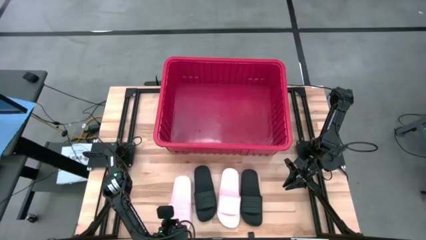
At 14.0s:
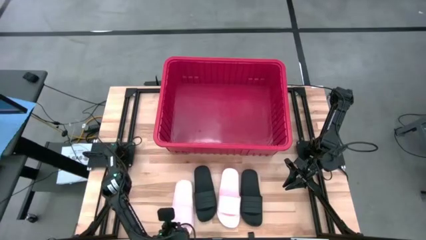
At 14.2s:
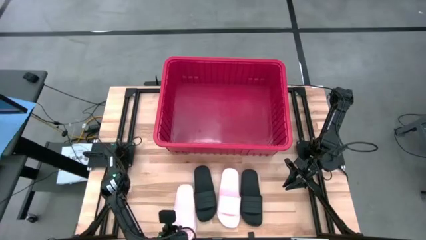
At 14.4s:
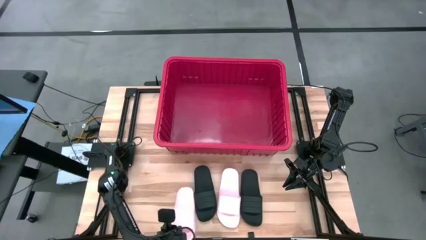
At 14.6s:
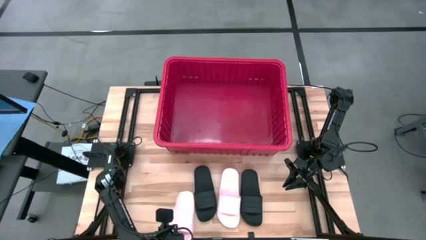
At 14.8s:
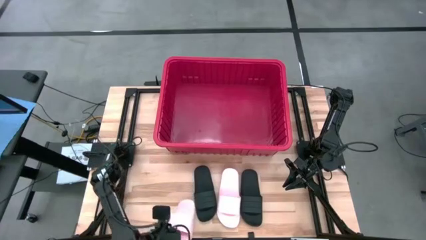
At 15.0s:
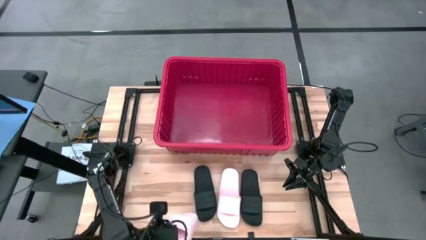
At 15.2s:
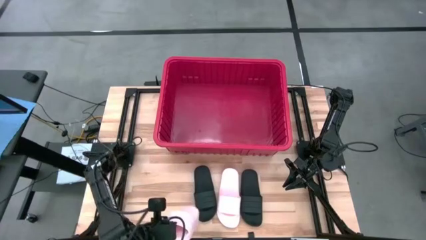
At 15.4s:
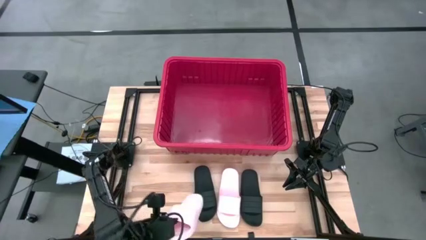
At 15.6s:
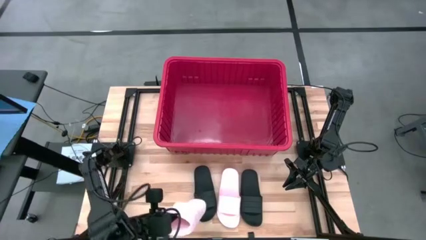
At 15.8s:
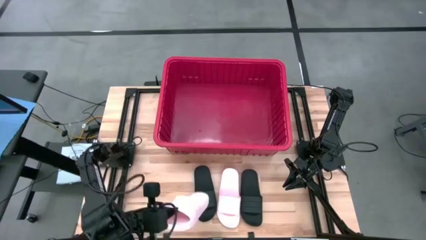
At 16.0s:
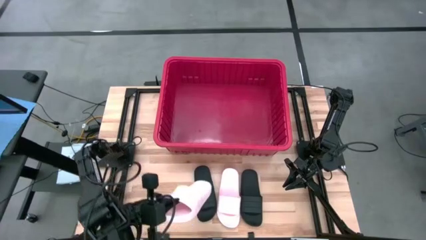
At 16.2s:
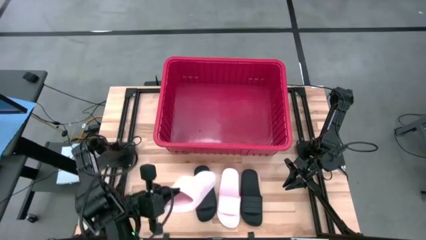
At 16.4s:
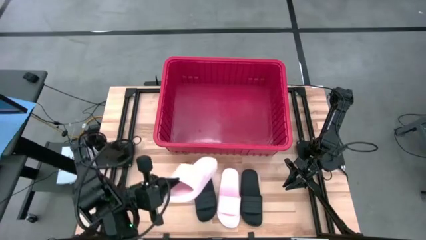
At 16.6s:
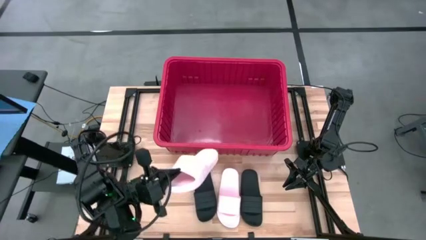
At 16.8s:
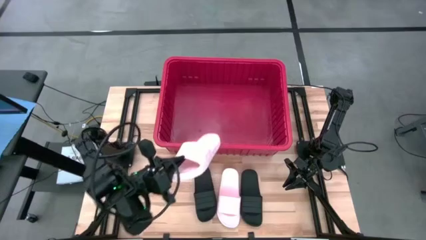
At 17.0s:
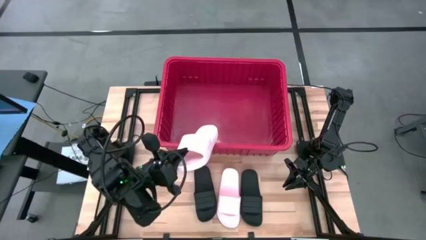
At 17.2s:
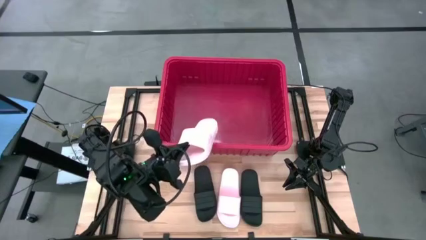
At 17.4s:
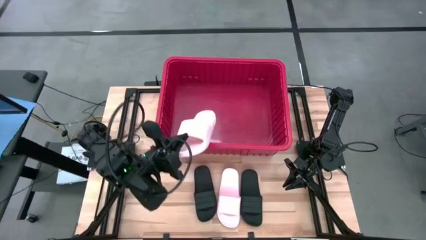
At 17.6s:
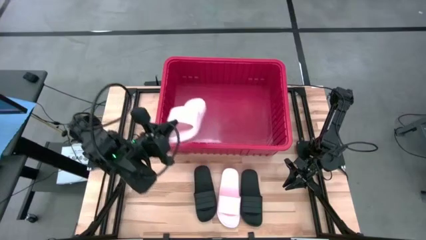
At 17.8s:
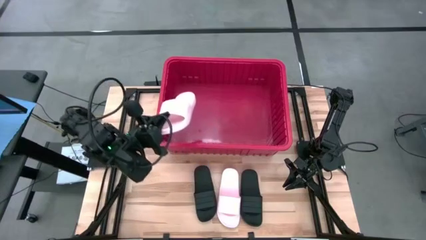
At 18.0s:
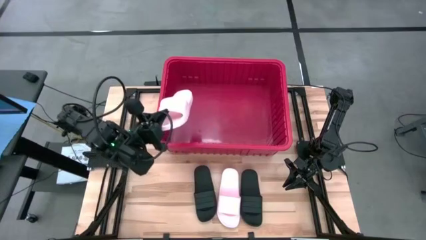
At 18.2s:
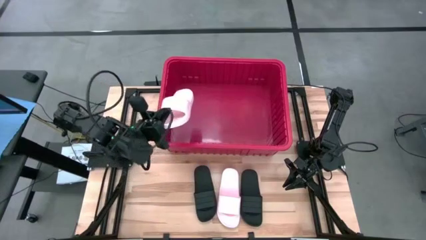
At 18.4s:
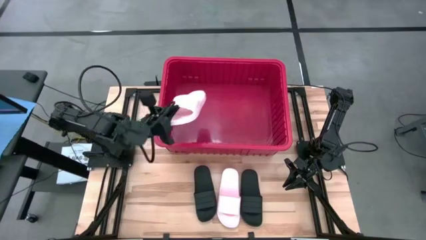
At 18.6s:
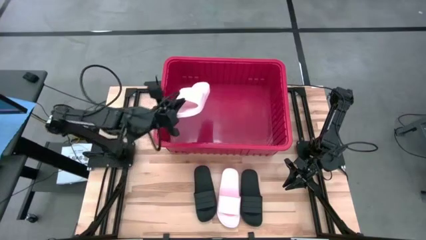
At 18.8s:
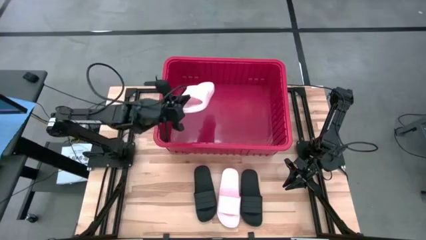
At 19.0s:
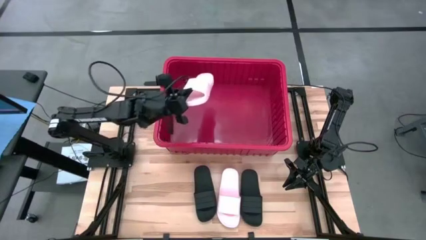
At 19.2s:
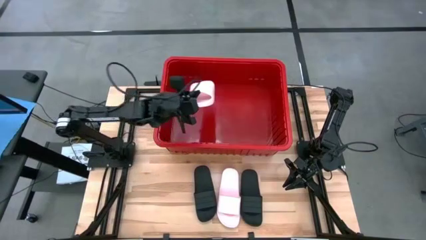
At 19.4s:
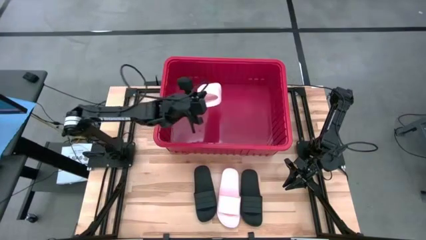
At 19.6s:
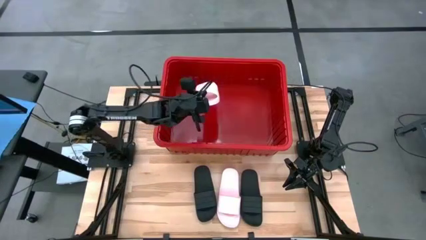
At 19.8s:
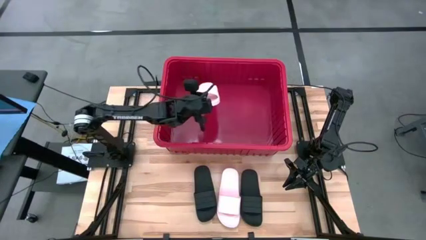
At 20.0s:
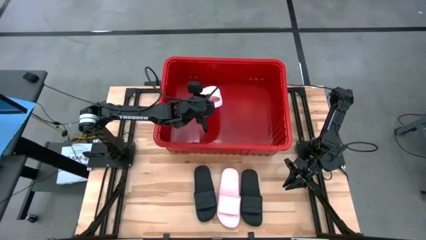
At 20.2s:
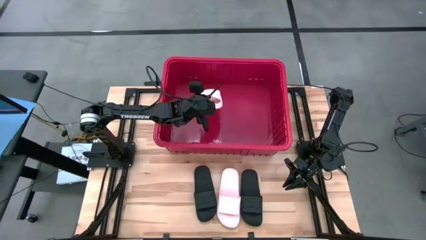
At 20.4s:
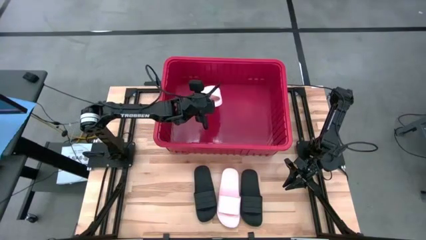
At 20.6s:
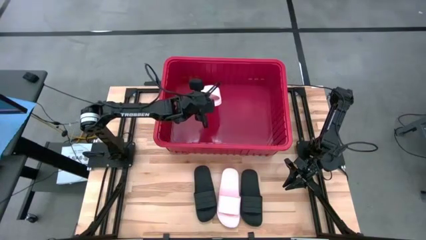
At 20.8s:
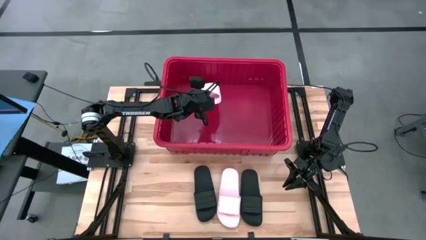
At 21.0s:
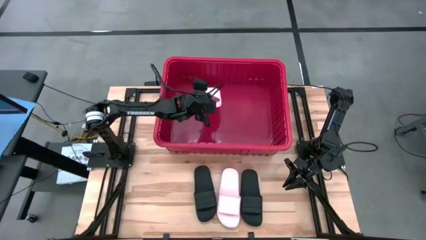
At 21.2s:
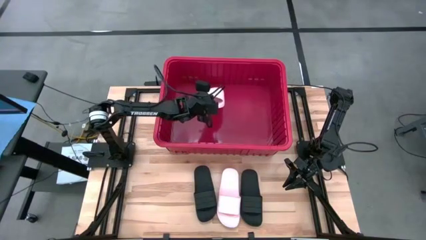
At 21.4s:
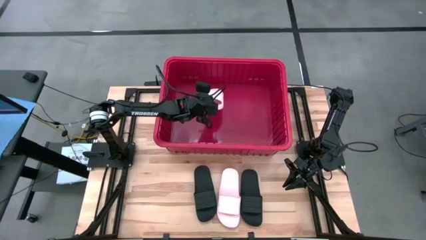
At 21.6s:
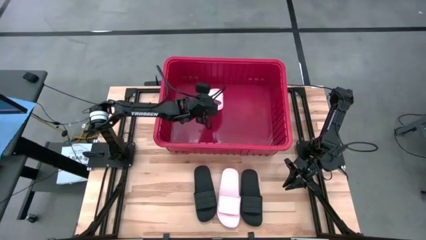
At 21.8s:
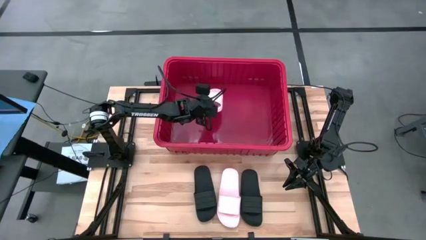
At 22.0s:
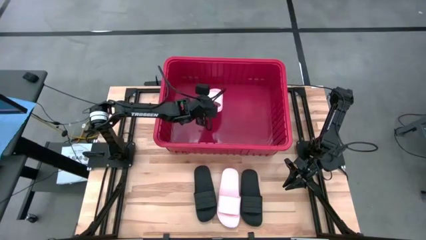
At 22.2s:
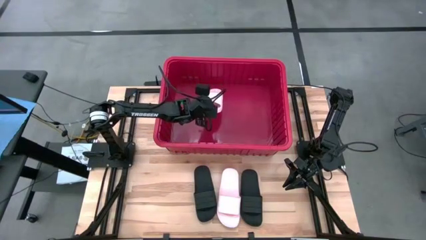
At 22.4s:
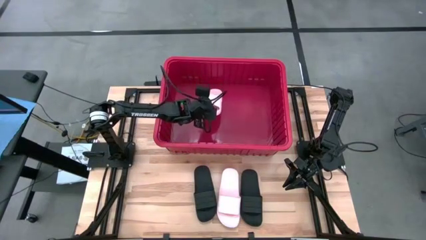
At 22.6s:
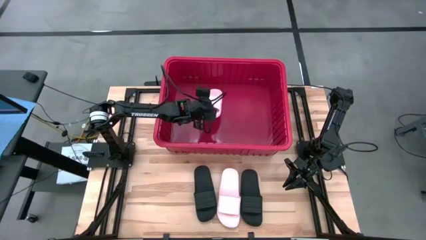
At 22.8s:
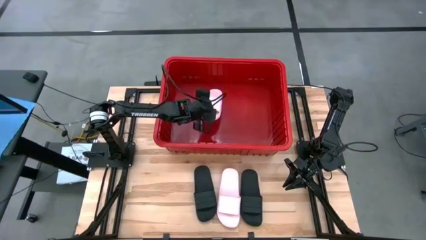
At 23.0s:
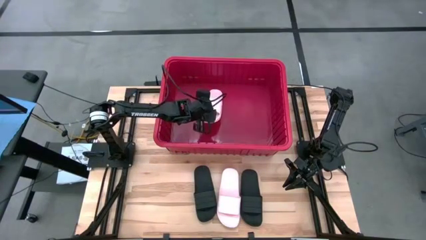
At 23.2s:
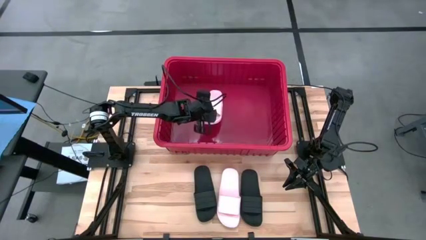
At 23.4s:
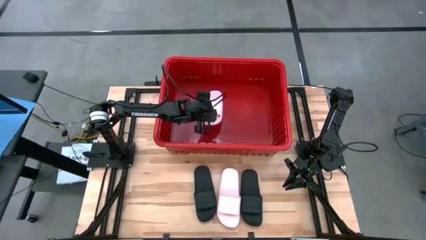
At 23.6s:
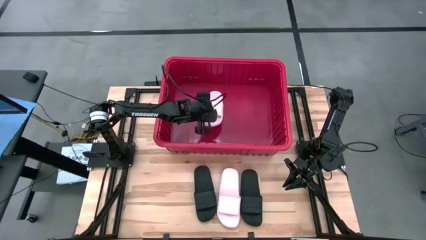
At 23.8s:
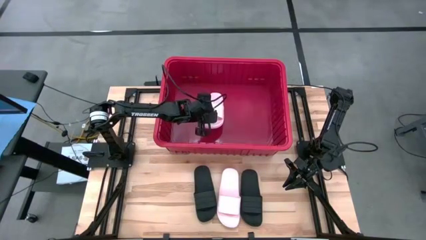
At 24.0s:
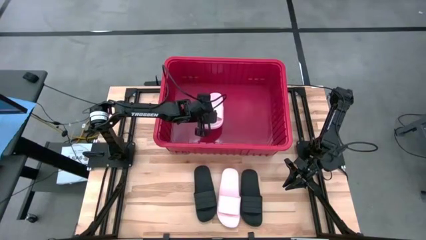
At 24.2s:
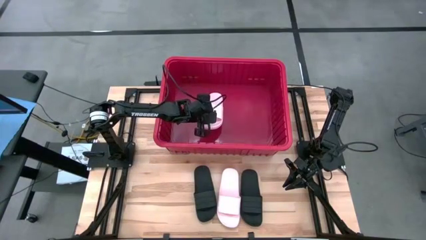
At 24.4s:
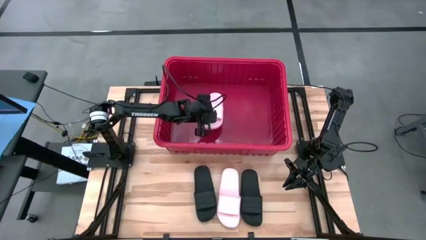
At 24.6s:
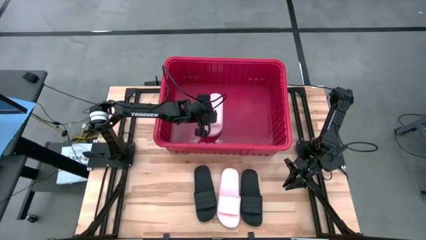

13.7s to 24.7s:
Task: Pick and place slides into bin
Put the left pink slide into the red container
